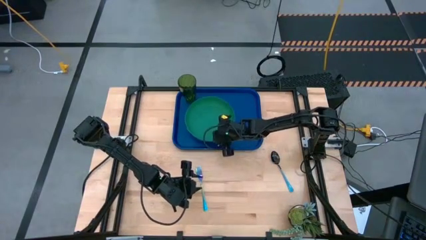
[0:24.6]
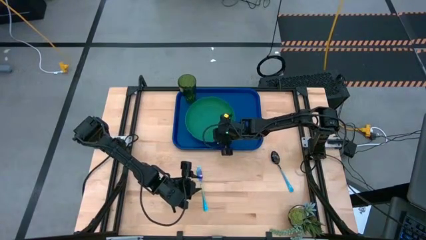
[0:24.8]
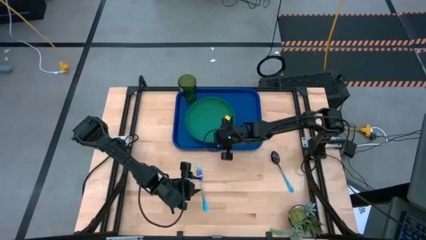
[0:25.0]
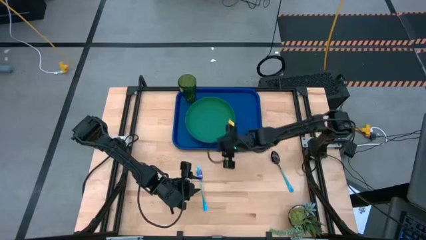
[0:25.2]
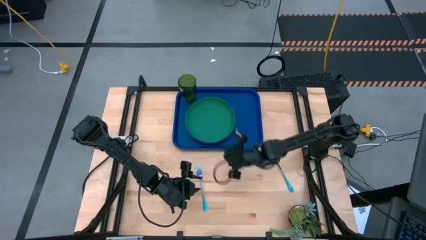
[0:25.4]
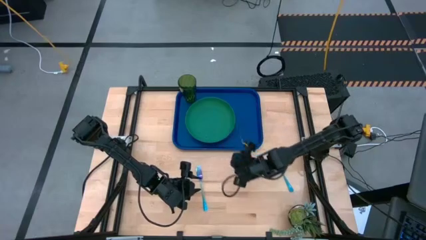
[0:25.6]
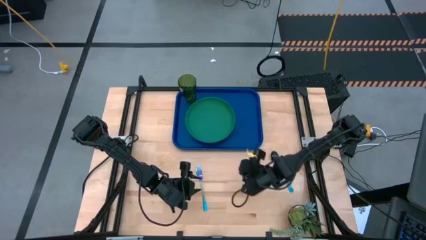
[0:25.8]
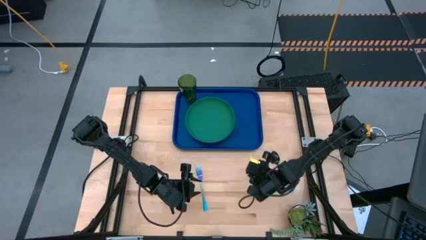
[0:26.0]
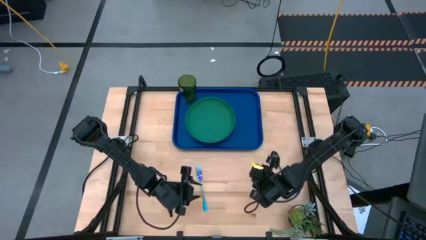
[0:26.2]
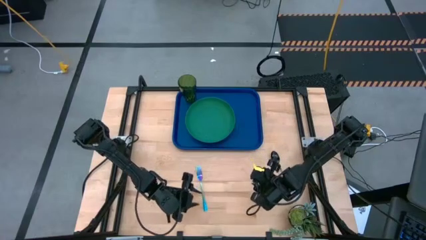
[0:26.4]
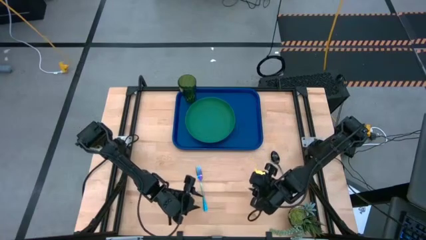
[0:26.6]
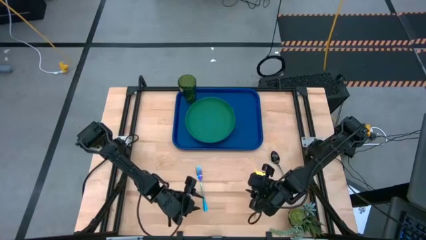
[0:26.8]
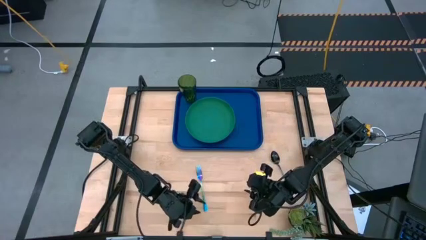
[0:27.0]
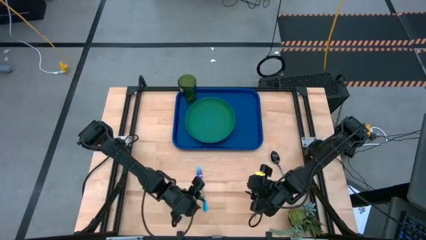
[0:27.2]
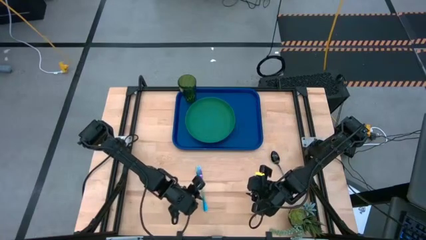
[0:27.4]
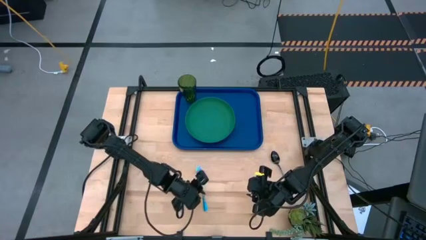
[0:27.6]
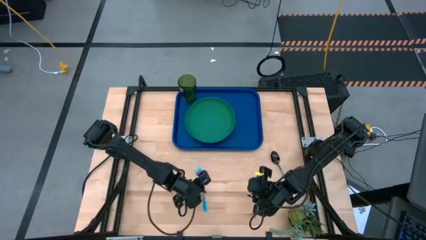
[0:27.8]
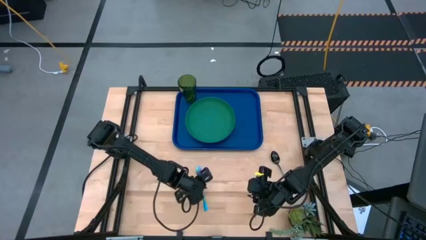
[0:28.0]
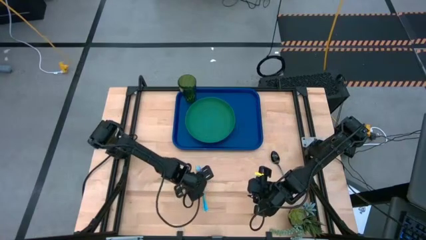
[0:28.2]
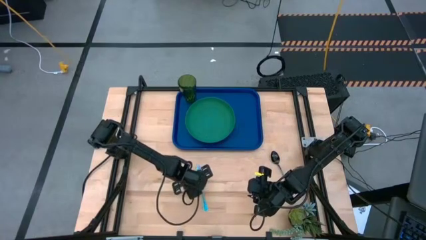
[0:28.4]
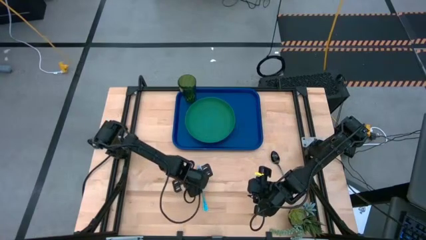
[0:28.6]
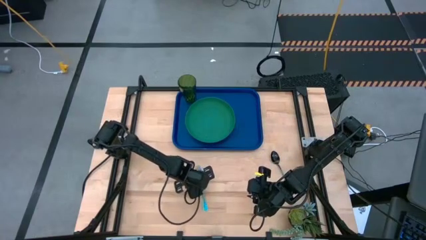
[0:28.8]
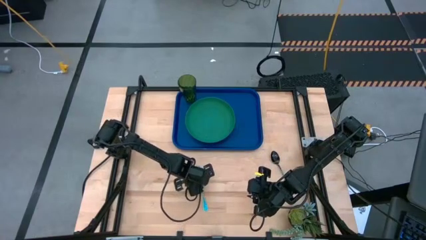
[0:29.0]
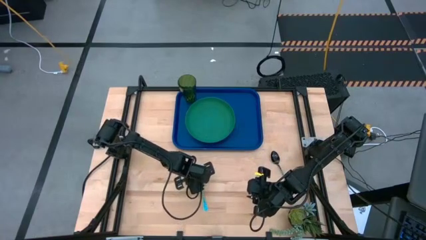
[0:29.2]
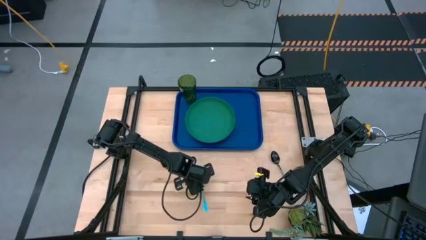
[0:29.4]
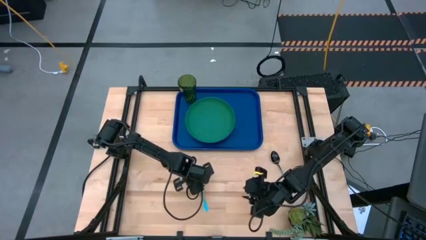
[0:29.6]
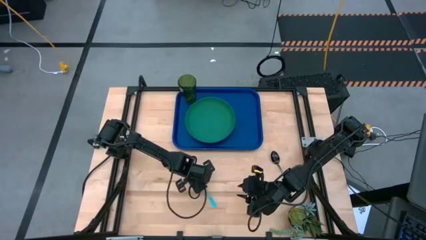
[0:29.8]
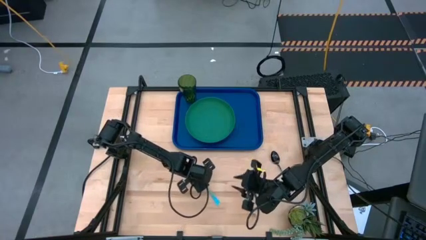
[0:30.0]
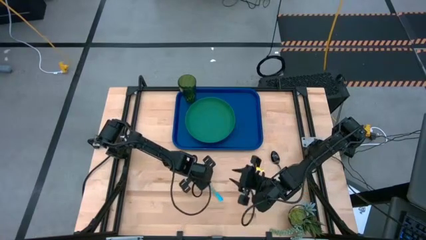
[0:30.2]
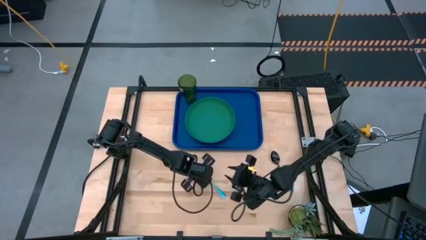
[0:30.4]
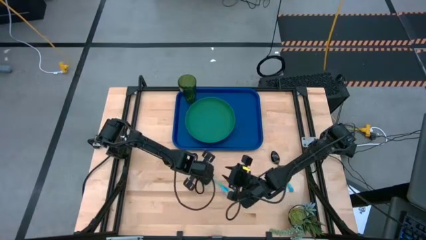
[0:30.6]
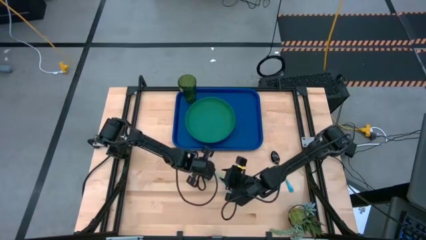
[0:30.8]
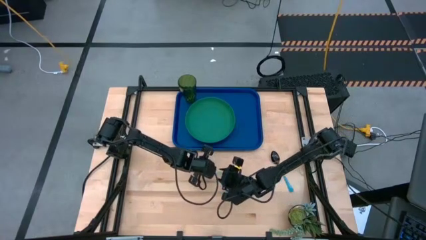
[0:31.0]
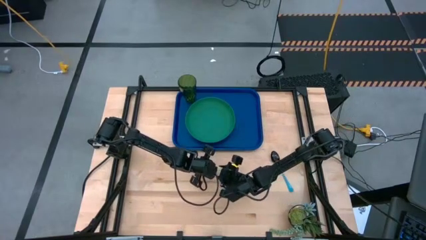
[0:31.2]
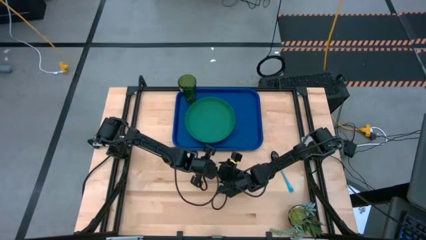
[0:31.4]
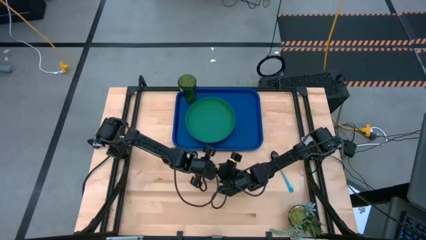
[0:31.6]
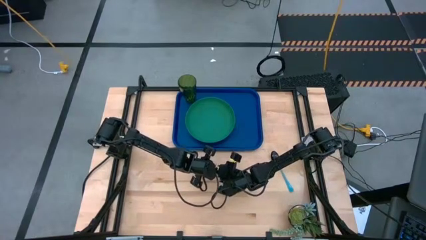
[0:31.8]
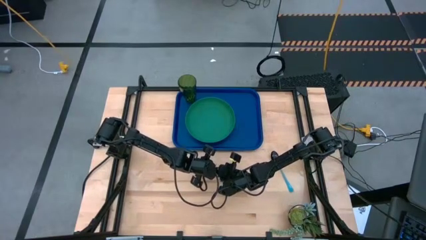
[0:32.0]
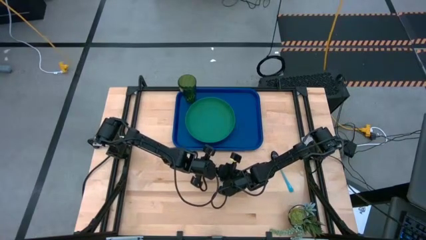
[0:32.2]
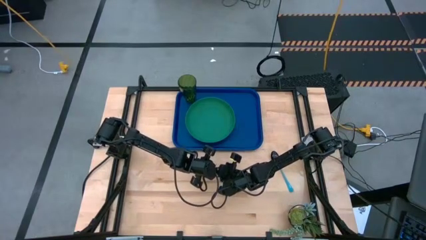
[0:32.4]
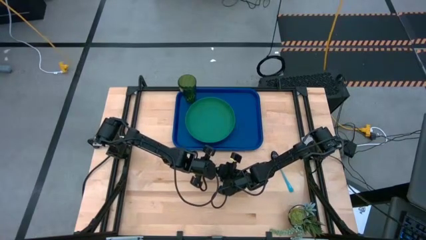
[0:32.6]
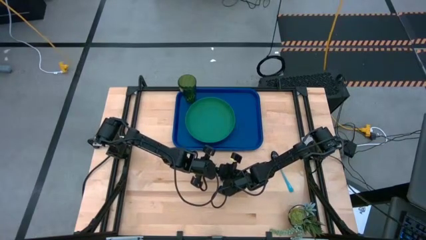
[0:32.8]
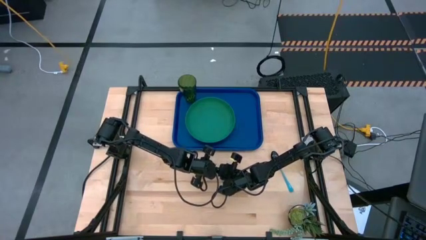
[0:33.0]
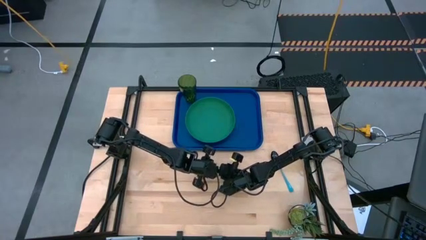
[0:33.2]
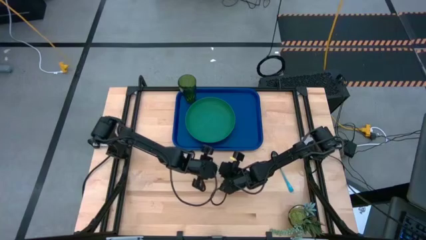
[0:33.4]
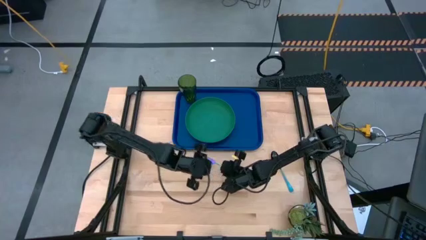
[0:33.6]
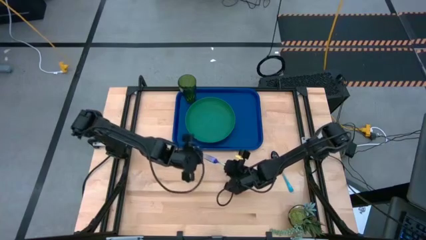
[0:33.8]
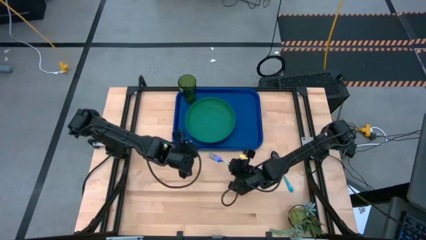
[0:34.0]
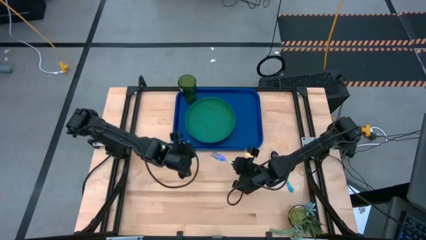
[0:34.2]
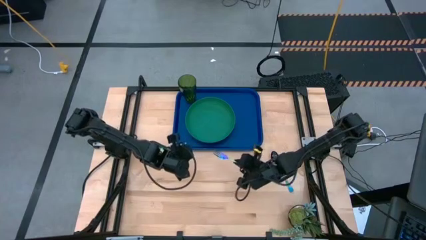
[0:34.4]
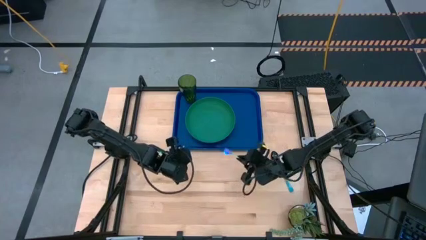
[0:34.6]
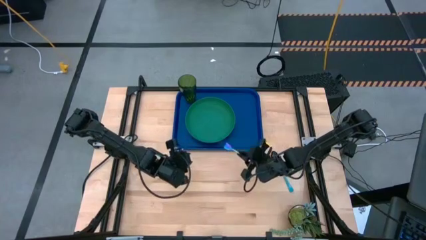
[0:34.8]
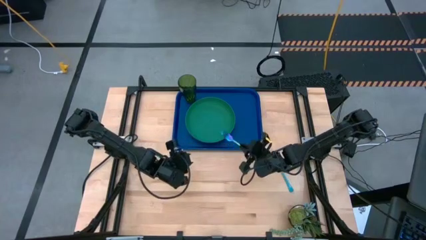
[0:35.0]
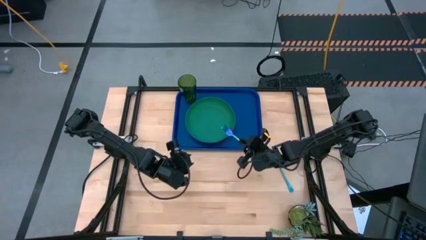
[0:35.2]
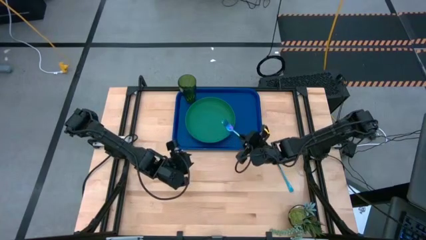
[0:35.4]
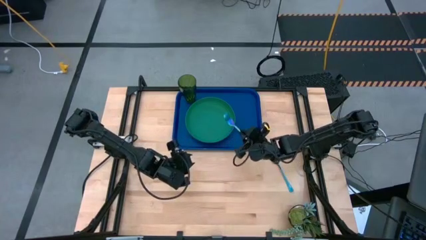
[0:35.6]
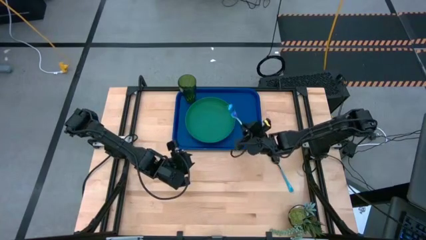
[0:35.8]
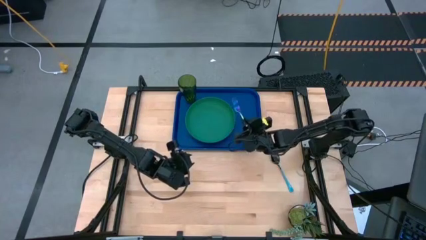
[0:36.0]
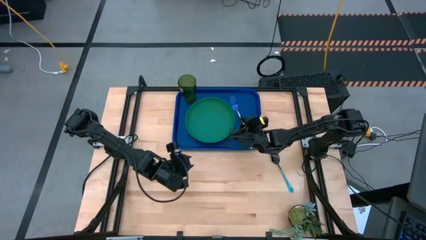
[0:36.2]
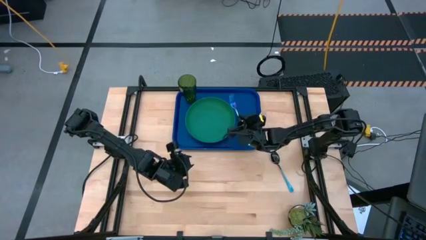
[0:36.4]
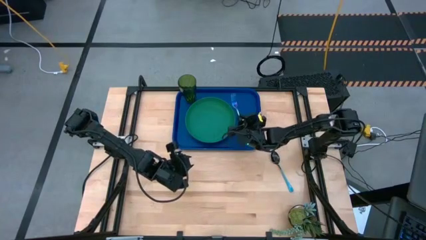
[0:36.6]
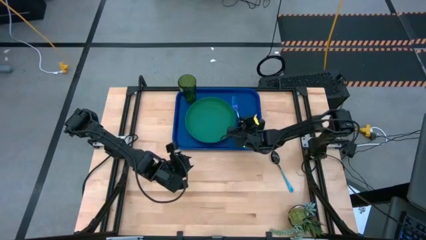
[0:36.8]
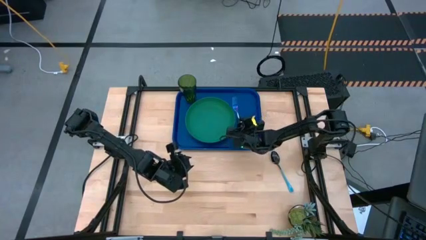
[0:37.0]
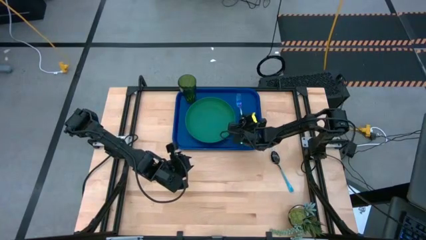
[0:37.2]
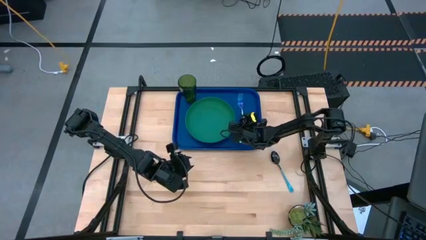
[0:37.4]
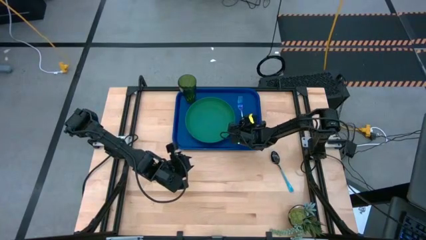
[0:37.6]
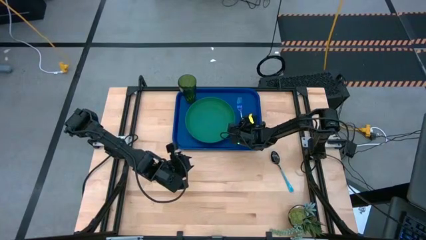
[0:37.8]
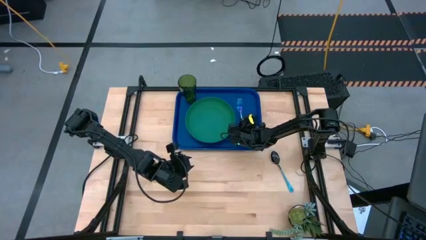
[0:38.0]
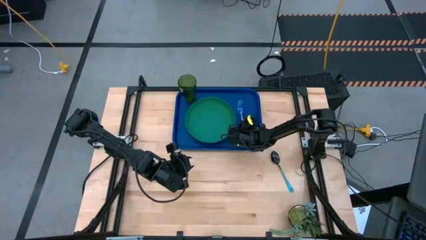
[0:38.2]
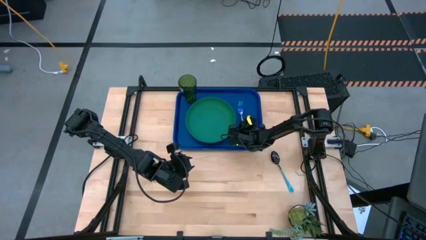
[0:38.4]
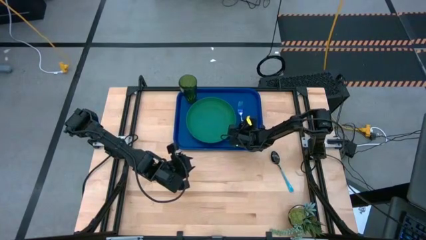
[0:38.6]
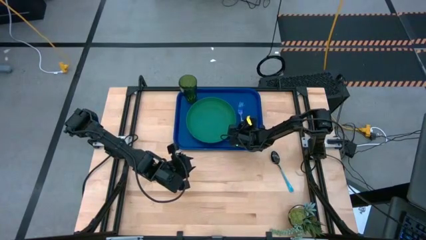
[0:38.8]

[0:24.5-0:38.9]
Task: Pick and place plate/cup/fork/spoon on tray
Put the blue fork to the right of the green plate on the blue serving tray
